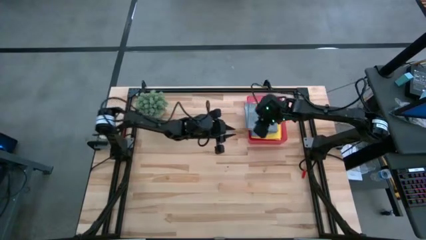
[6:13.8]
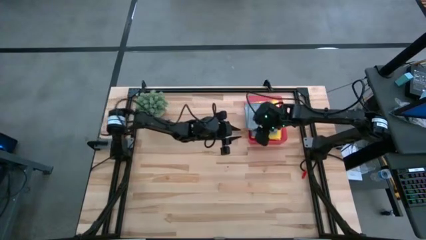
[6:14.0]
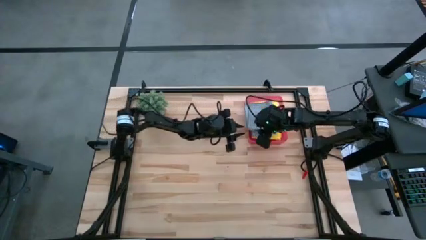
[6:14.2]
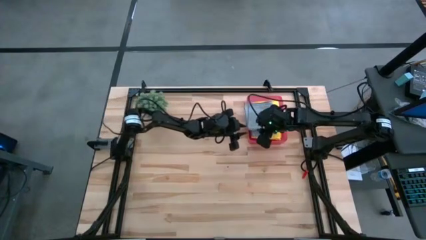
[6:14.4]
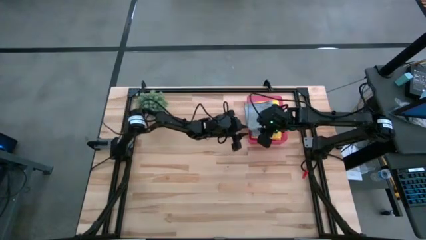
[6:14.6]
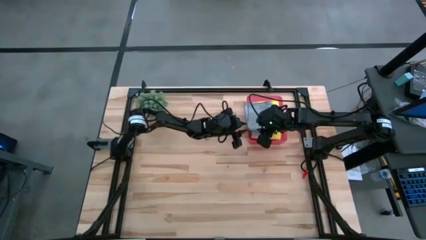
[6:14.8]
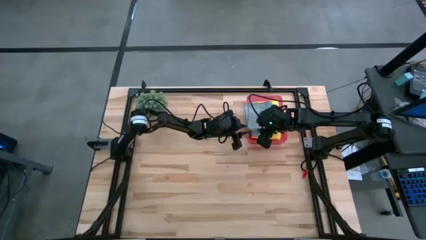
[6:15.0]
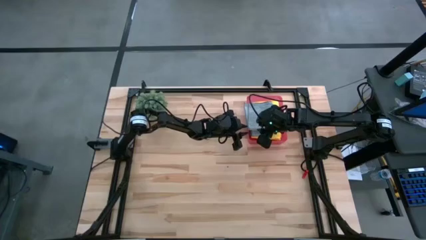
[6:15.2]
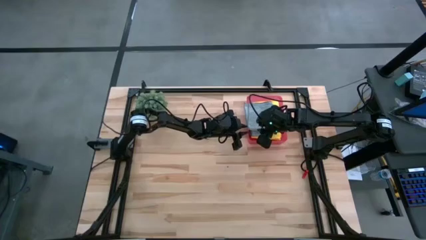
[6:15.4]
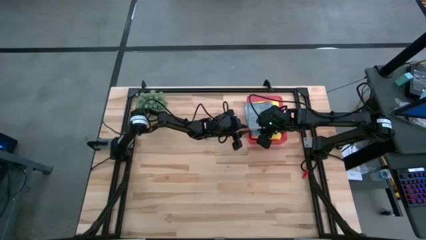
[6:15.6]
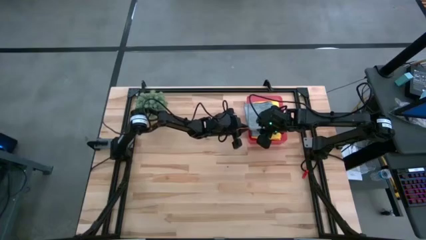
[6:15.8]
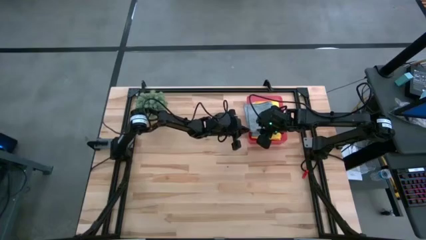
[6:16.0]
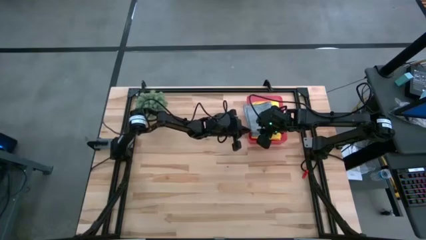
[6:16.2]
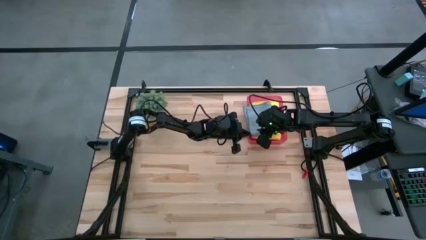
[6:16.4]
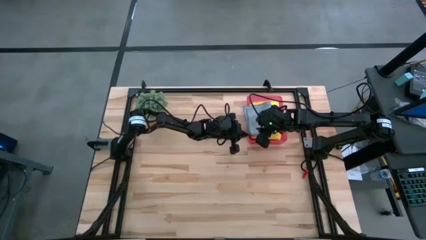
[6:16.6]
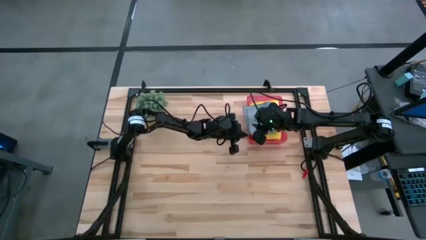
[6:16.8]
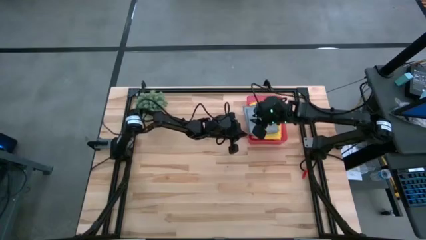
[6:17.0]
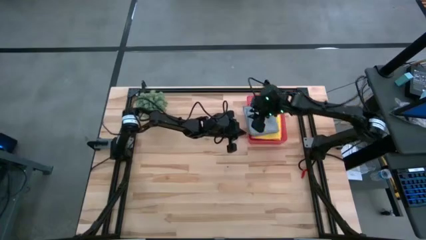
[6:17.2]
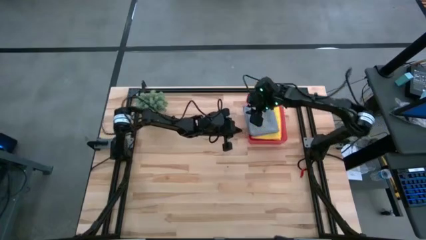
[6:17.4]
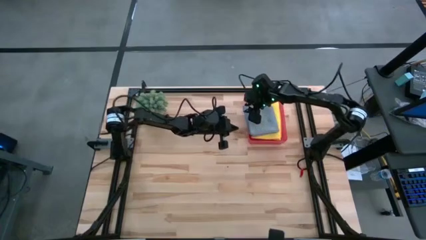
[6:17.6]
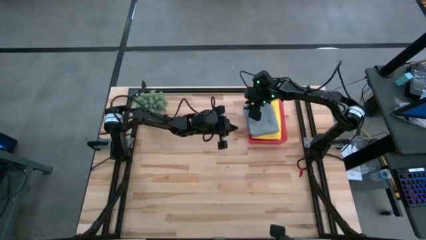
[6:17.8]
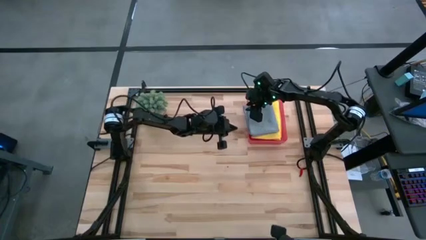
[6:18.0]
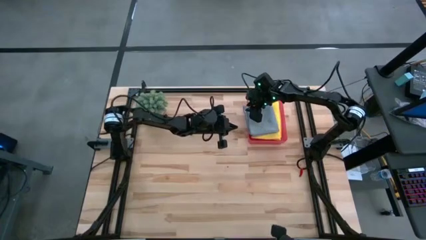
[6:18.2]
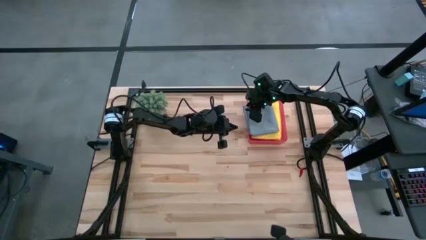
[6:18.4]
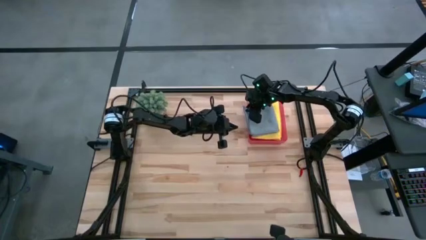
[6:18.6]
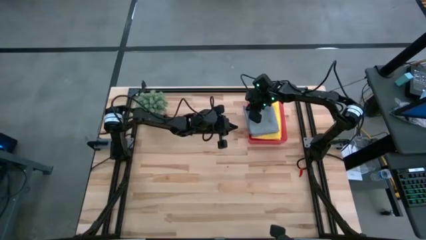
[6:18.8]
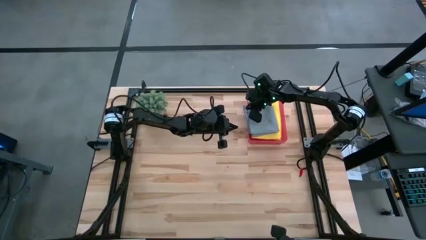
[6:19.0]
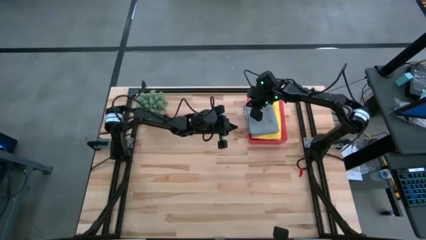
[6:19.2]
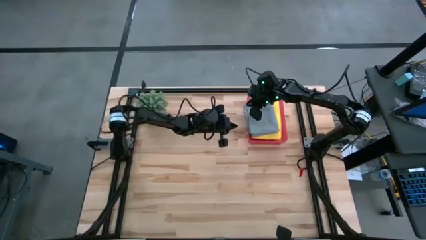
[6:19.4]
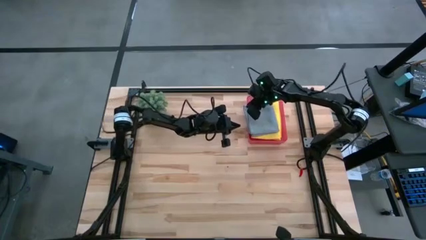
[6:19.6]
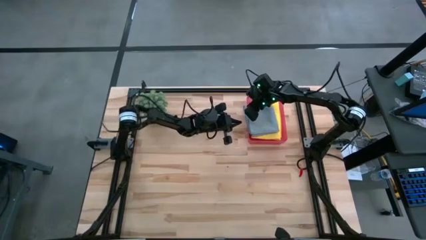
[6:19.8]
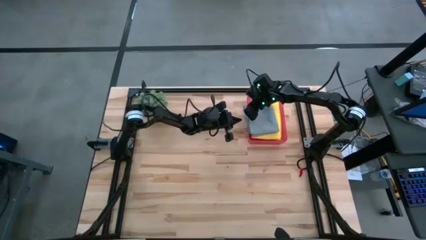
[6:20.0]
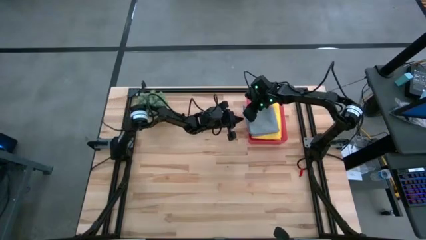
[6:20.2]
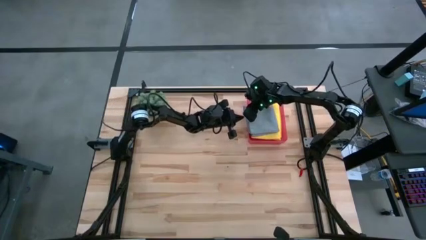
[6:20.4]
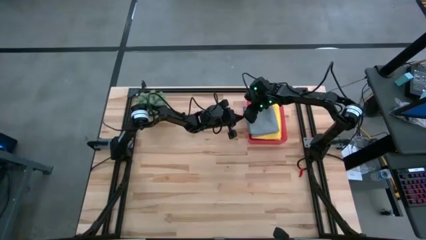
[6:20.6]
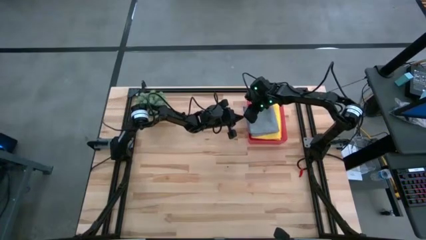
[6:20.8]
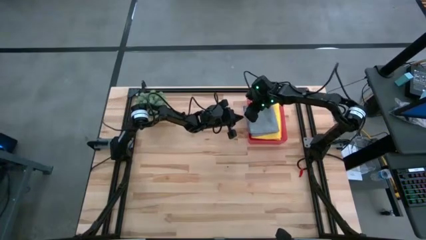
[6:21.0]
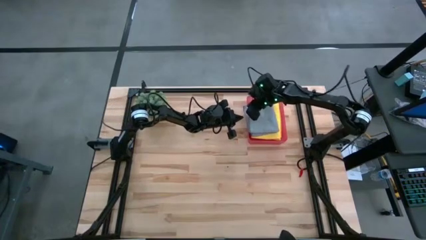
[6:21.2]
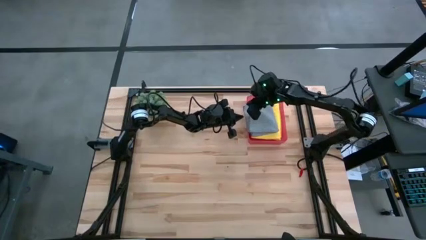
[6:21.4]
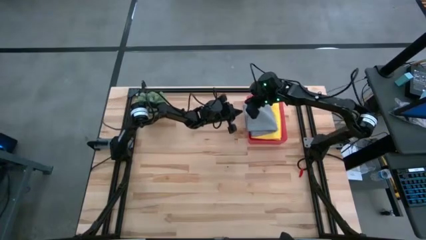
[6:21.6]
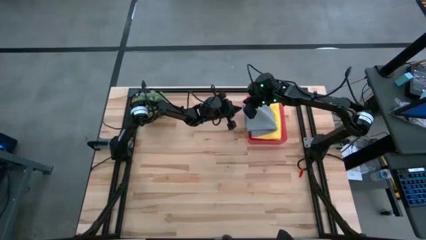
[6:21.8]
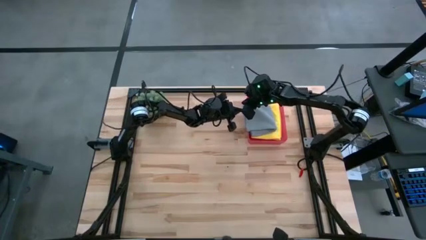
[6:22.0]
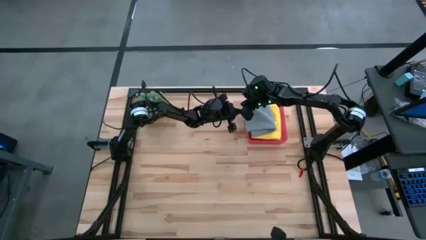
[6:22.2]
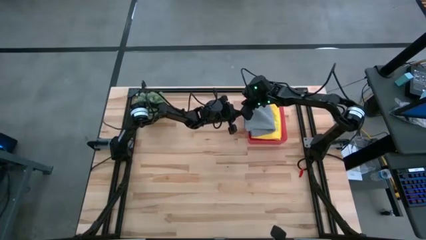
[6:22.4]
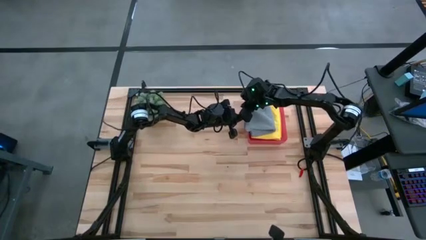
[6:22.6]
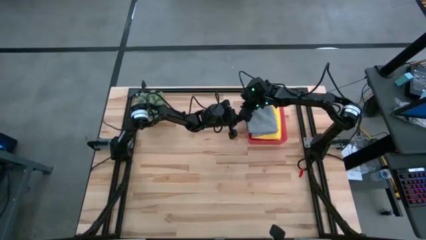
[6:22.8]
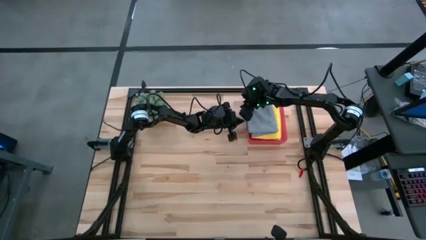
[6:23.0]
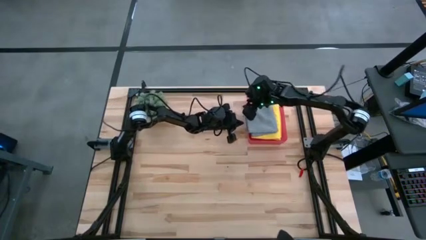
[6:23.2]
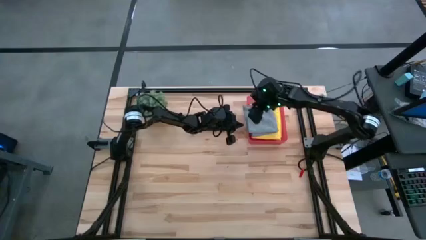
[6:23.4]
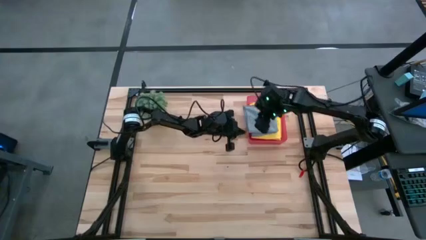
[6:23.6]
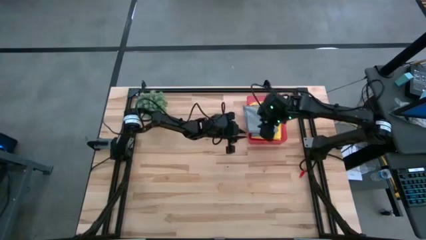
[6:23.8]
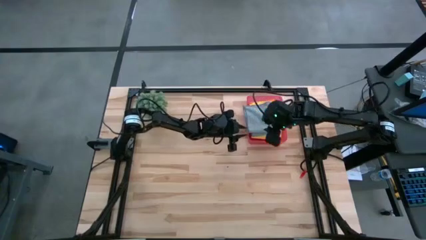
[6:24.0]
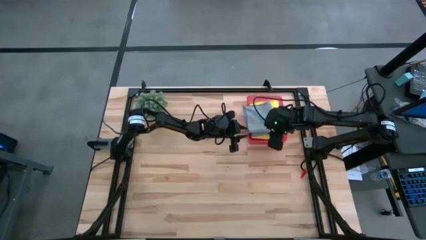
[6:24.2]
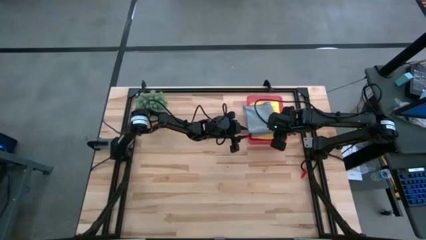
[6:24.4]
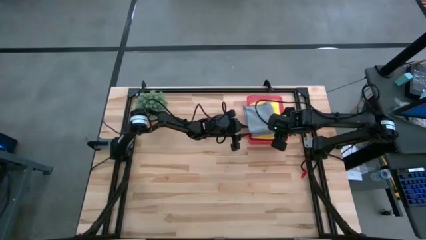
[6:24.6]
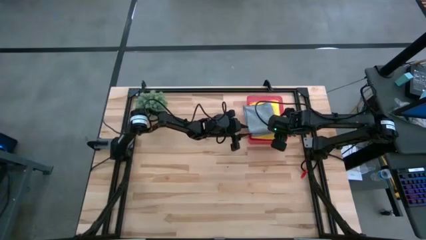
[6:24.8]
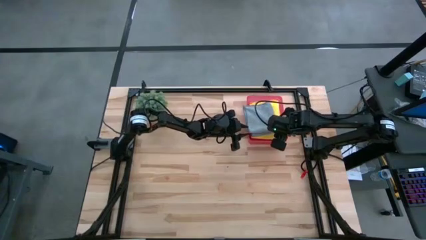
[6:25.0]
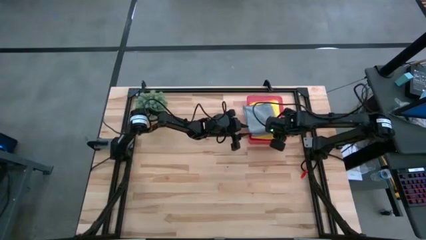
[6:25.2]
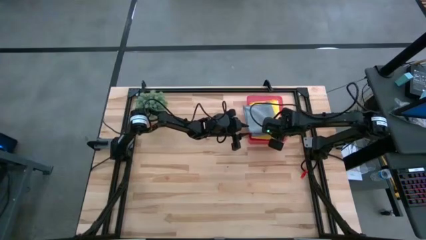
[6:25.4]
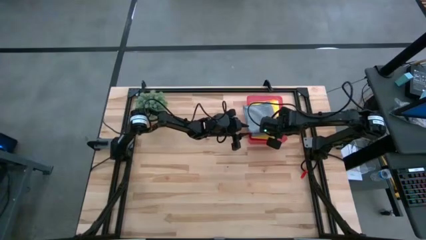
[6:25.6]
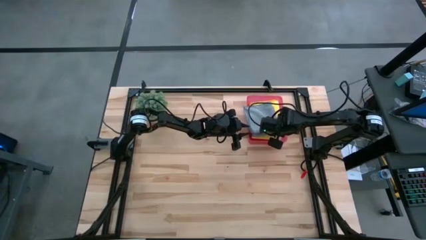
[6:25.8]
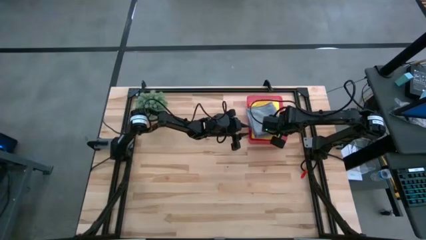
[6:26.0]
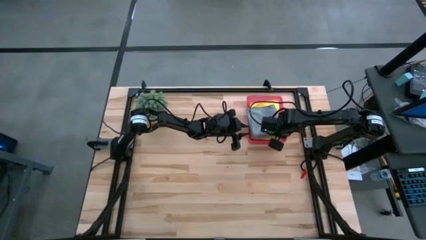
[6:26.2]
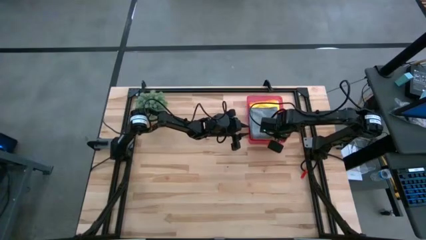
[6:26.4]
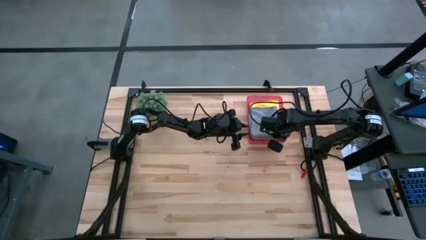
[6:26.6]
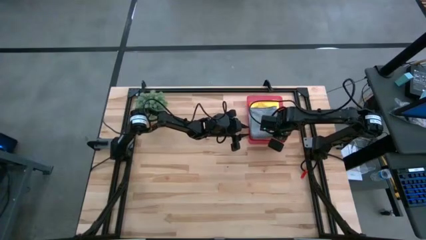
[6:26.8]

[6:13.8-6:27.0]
Task: Fold microfiber towels
Put the gray microfiber cloth into the pink bin
